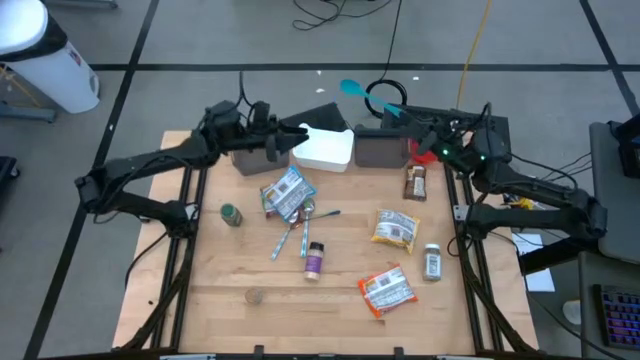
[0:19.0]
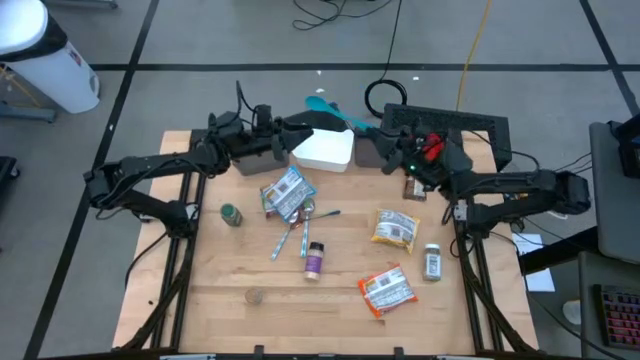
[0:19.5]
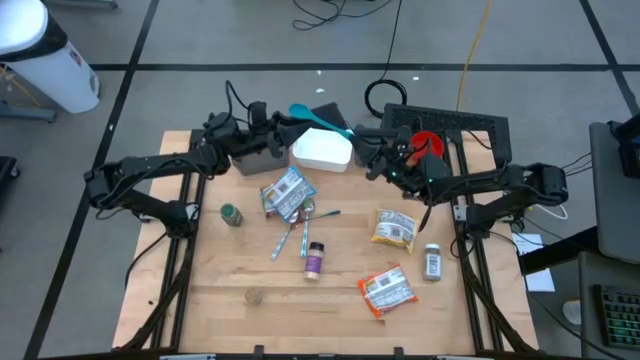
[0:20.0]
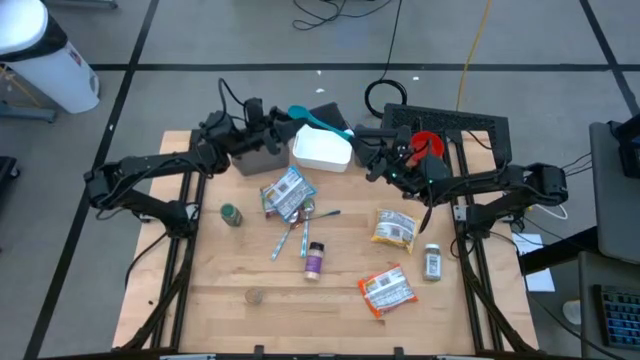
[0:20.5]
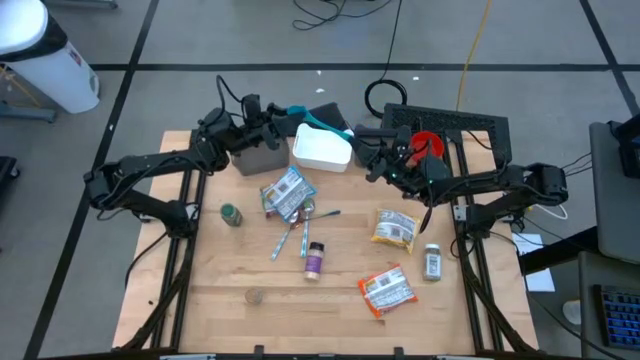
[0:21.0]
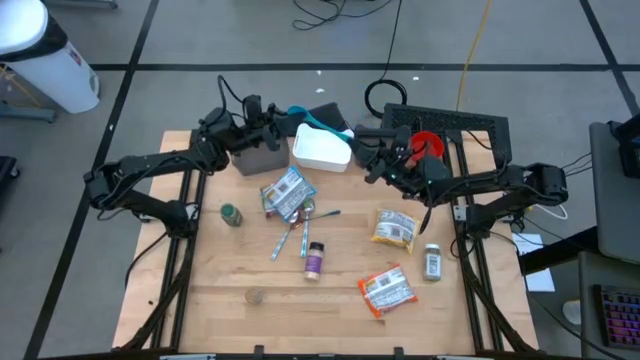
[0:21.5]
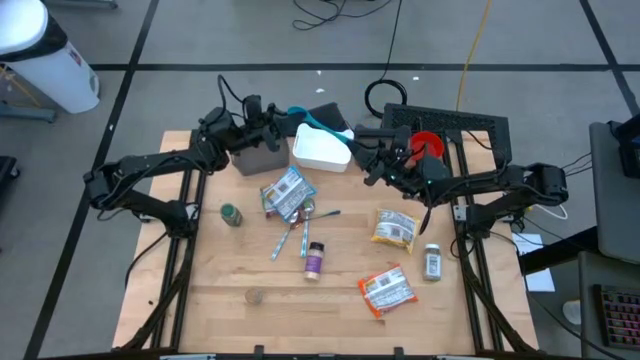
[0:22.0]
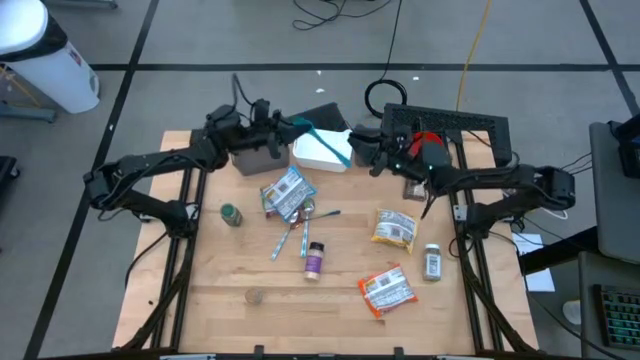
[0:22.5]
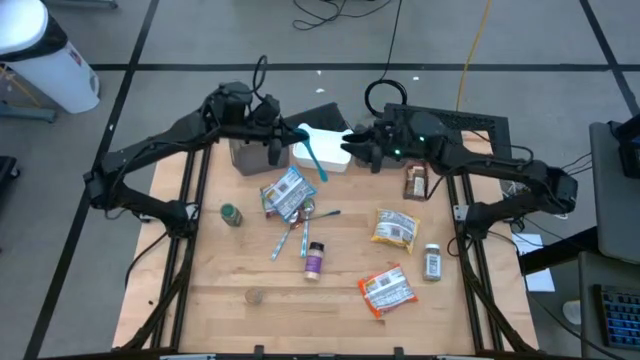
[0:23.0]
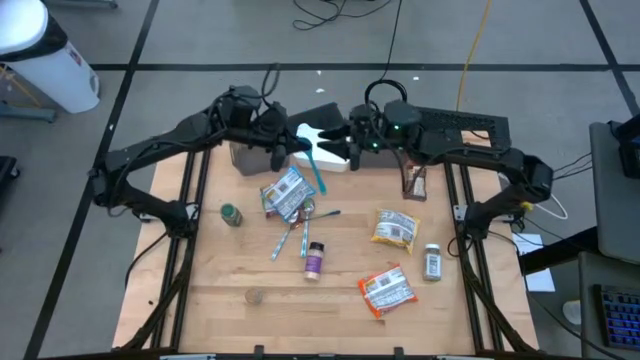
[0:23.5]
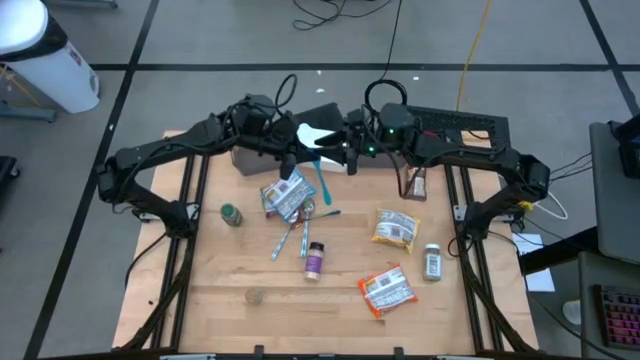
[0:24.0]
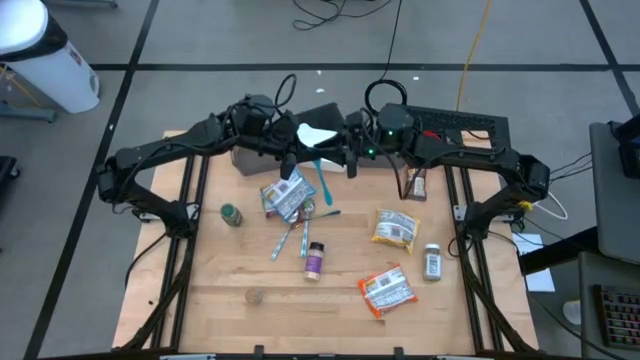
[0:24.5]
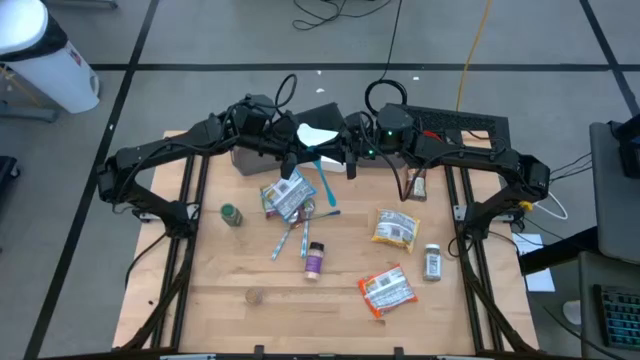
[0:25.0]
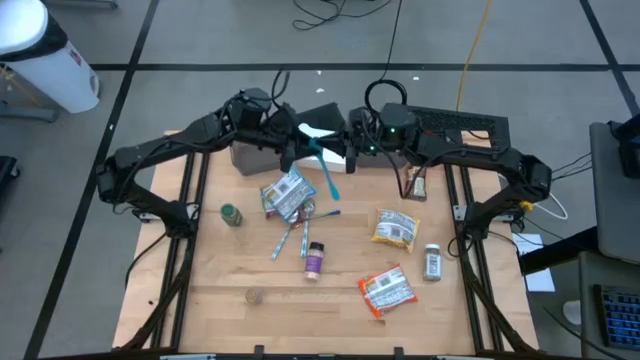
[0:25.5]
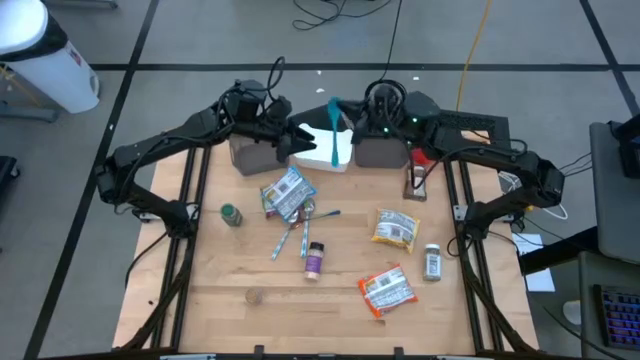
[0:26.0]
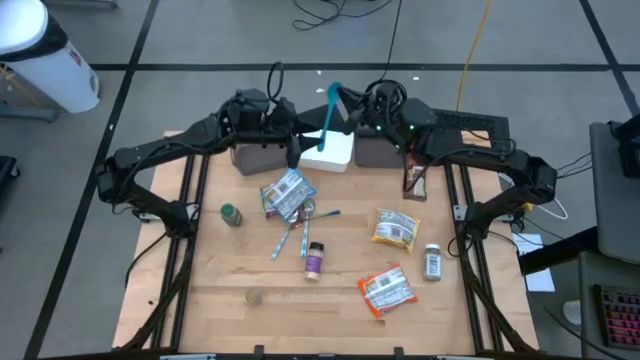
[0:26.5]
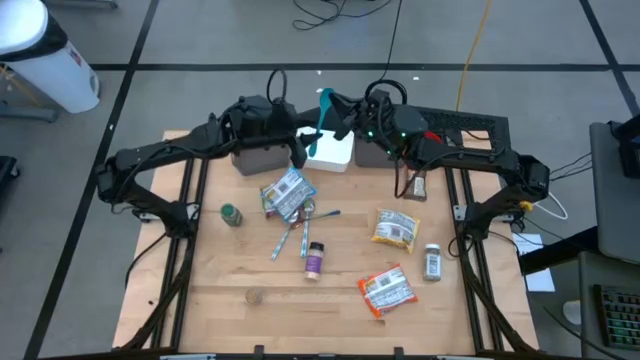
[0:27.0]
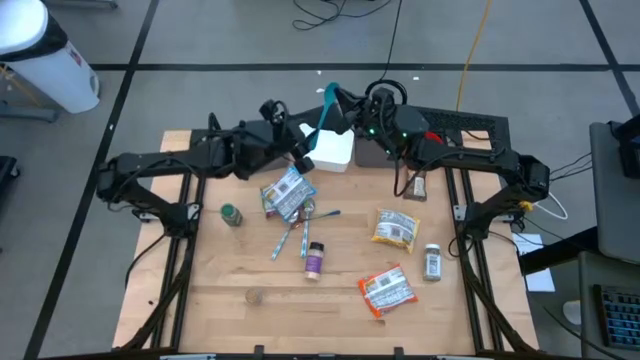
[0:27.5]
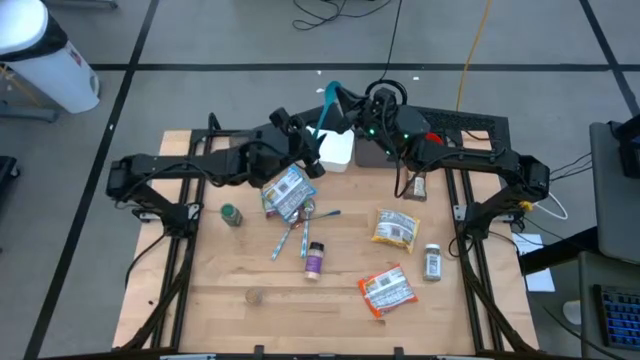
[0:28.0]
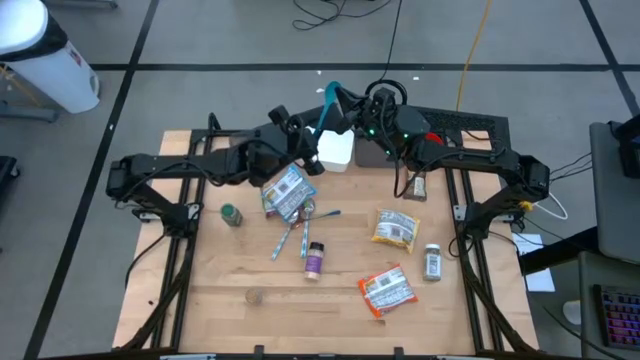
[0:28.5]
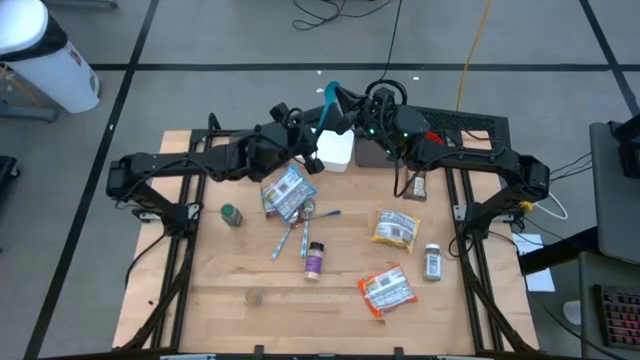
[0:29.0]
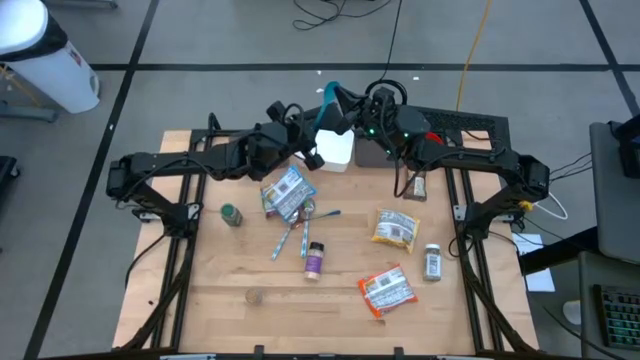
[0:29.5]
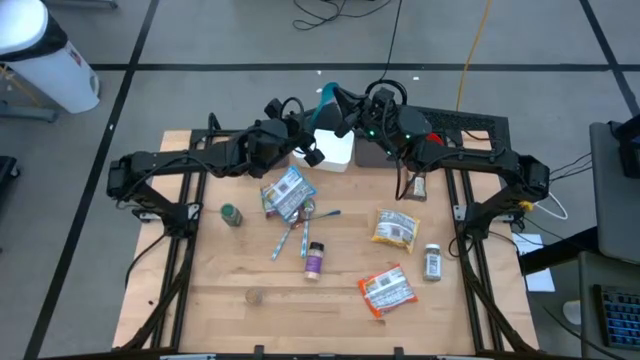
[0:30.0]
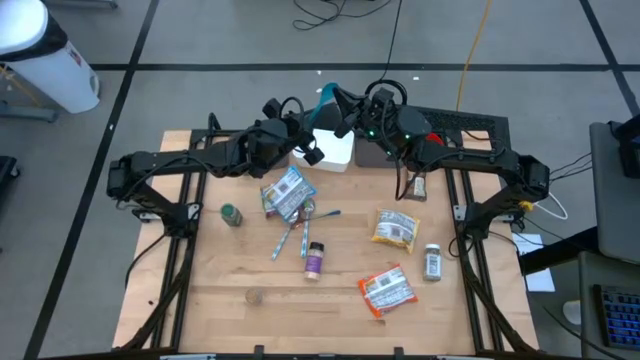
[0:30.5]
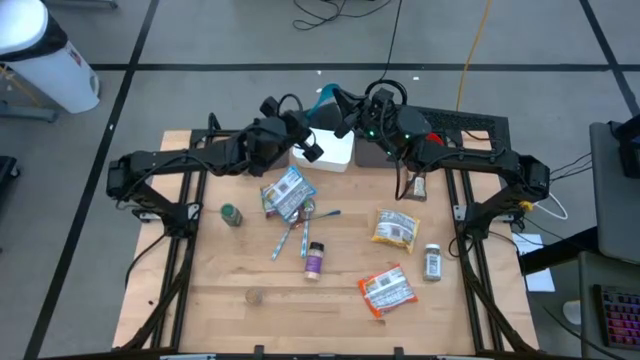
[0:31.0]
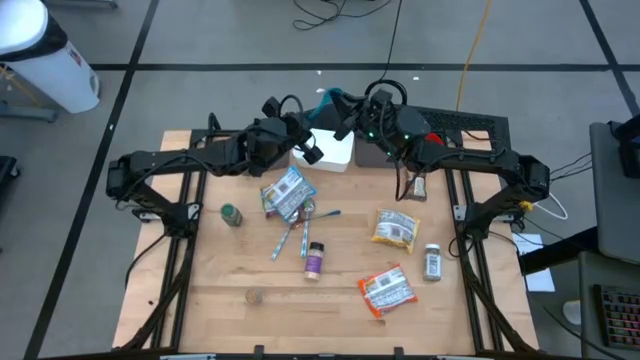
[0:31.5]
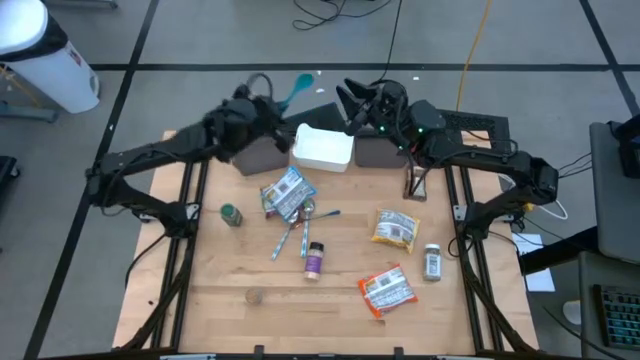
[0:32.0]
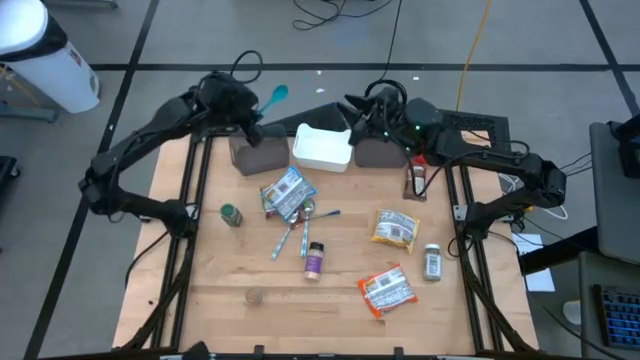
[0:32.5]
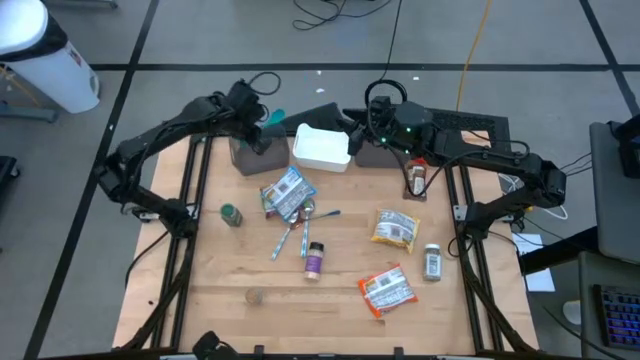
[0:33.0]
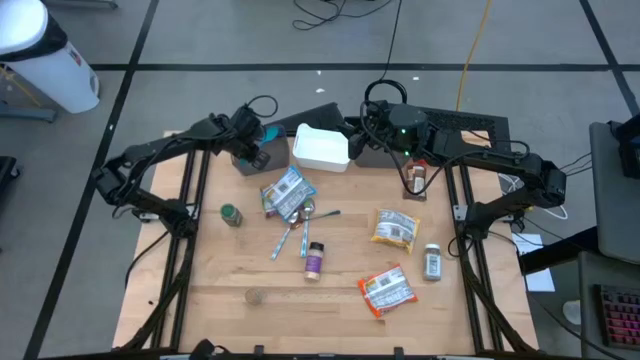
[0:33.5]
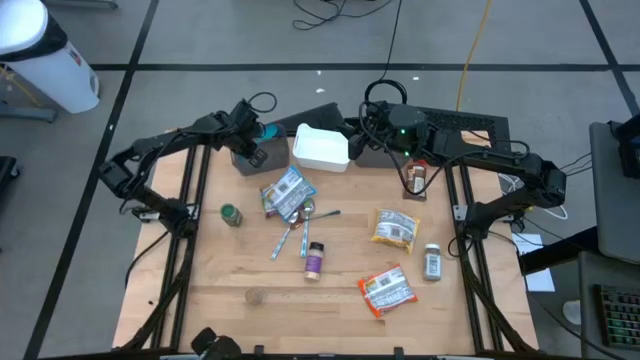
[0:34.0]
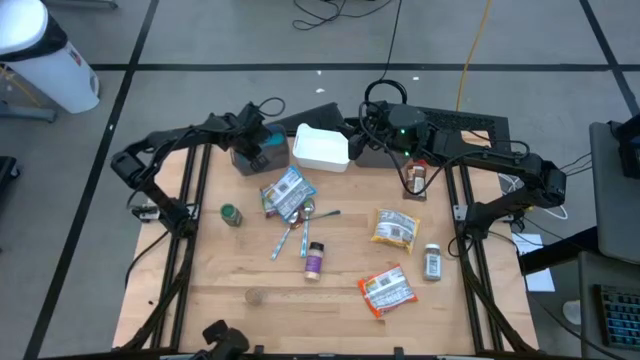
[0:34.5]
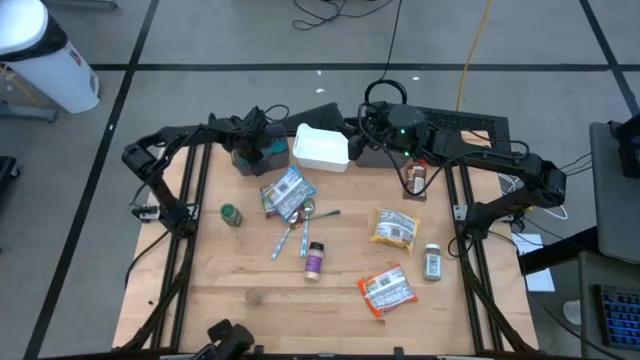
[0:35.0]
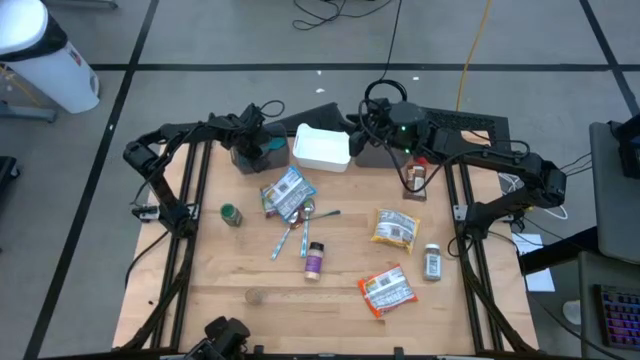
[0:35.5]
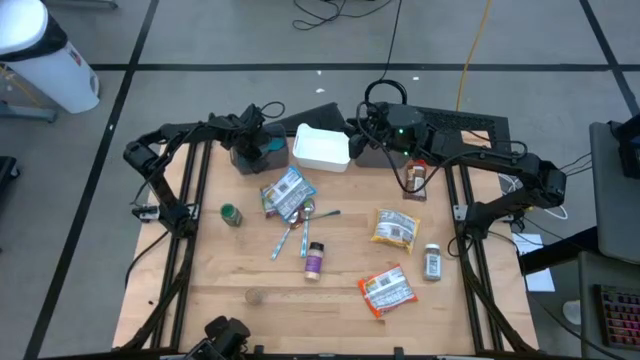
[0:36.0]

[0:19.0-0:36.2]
Task: Pick & Place Food Item
Put the blue baby spoon into the left black bin

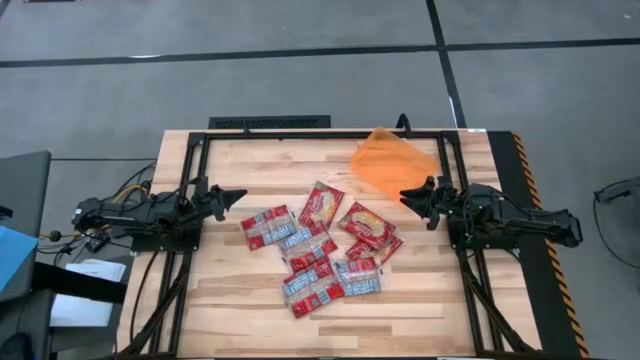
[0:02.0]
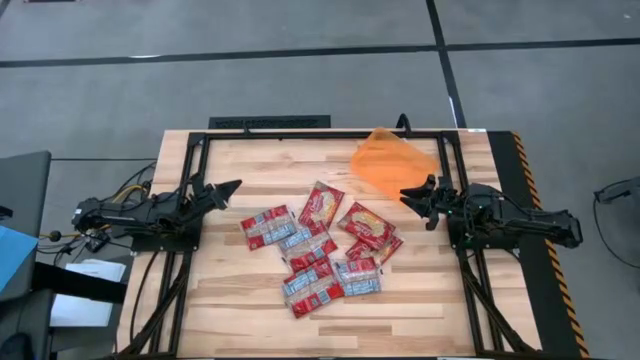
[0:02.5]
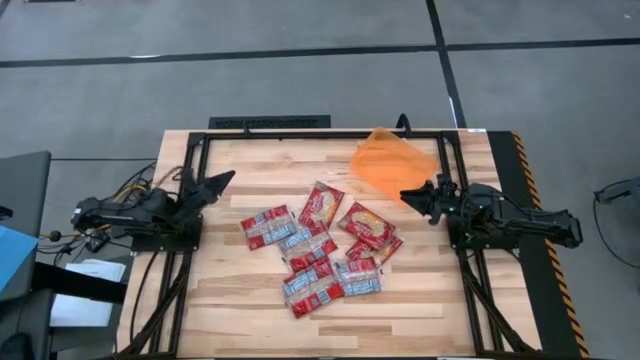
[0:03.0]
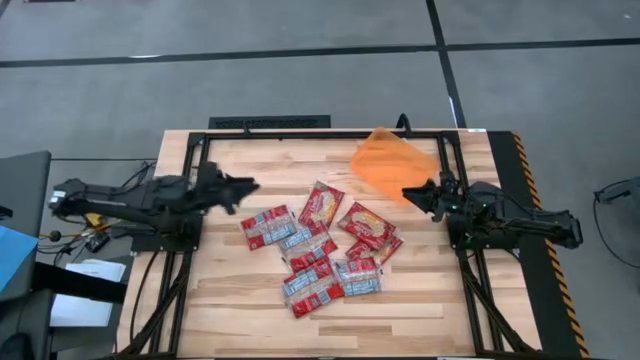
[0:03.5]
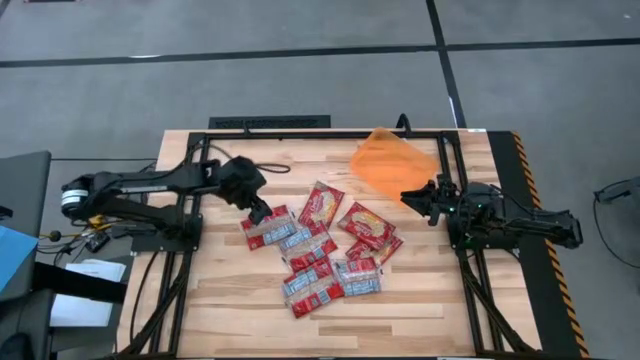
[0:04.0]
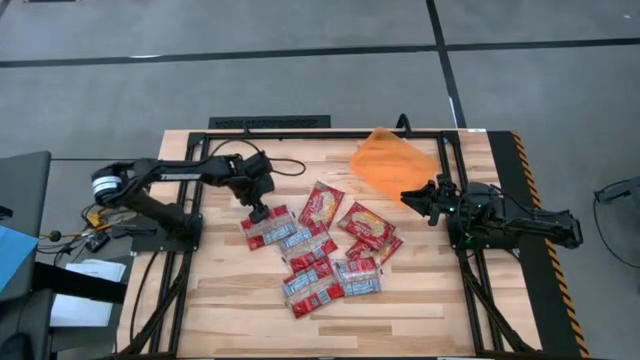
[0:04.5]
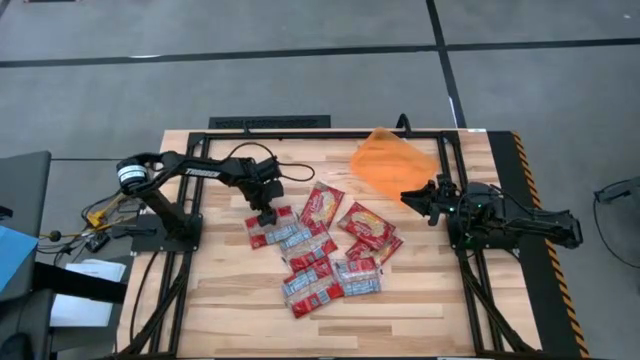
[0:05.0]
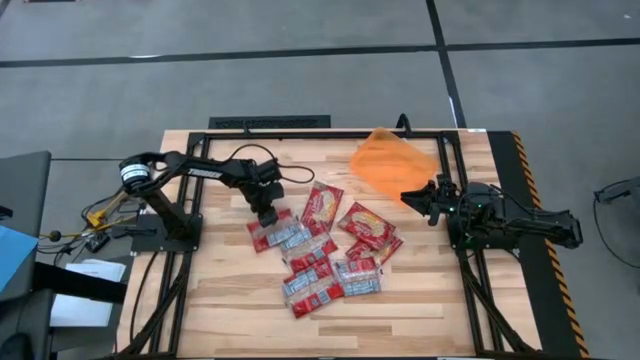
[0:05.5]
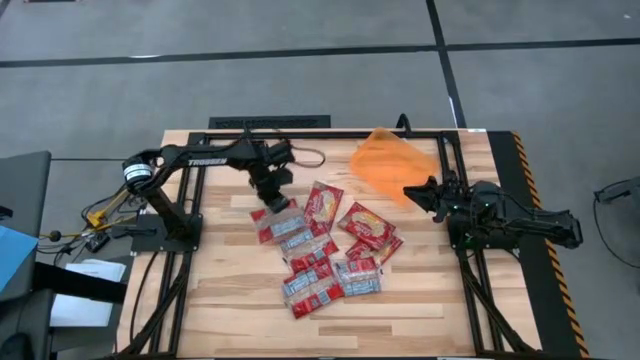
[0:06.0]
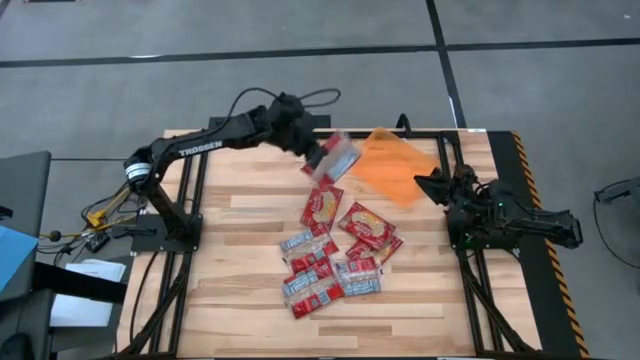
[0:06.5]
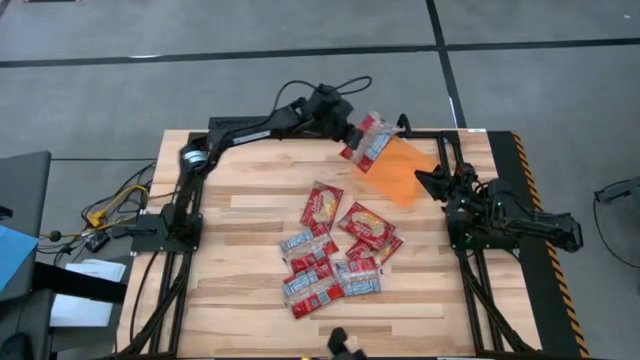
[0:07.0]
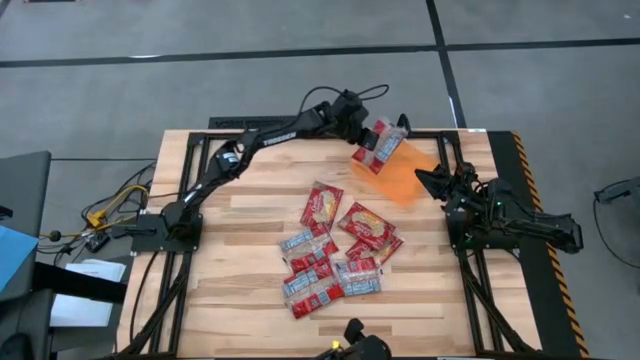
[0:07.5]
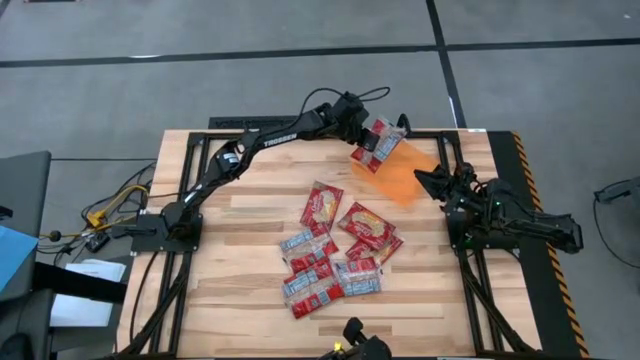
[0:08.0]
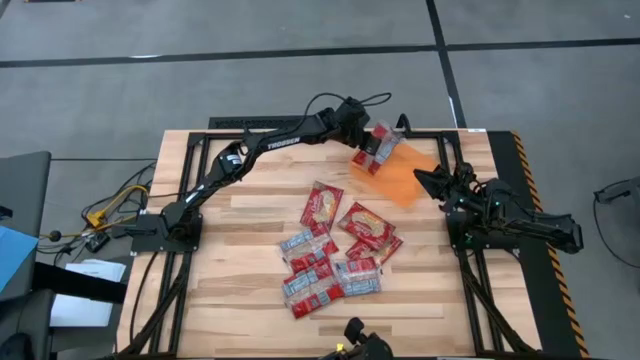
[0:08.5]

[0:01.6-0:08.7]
Task: Sort popcorn bags into baskets
Put the popcorn bag into the orange transparent bin
